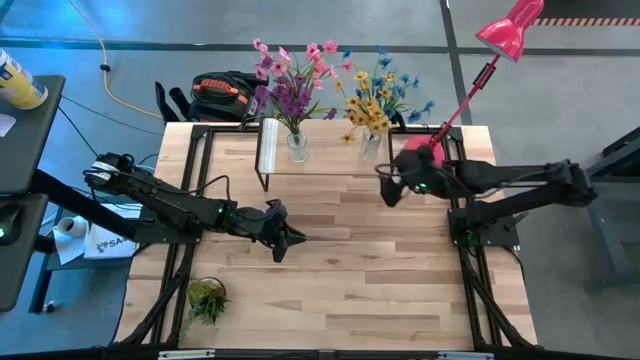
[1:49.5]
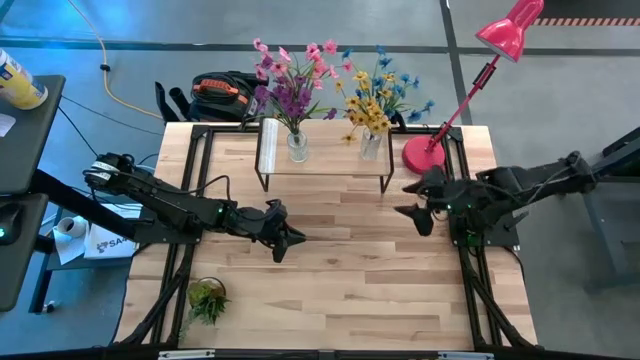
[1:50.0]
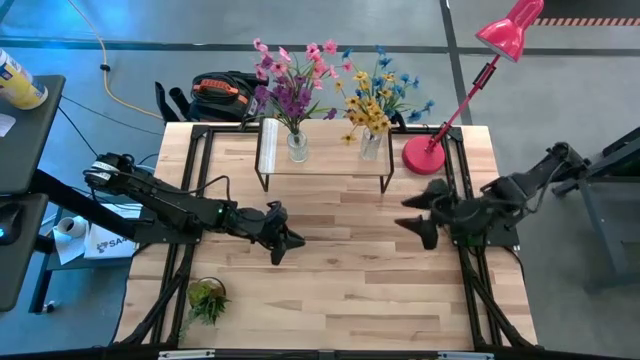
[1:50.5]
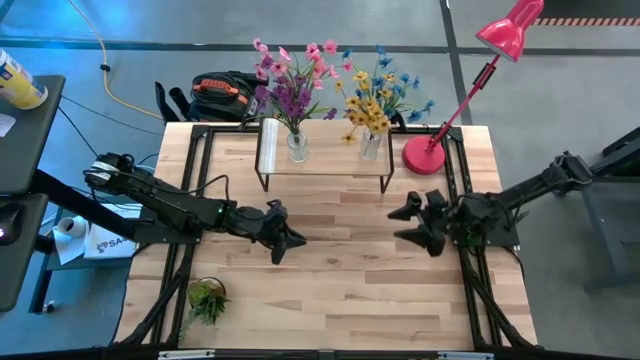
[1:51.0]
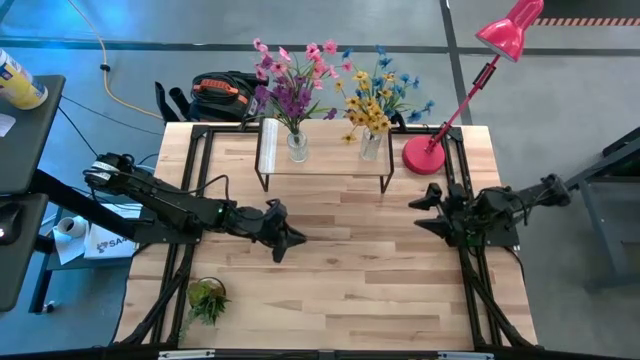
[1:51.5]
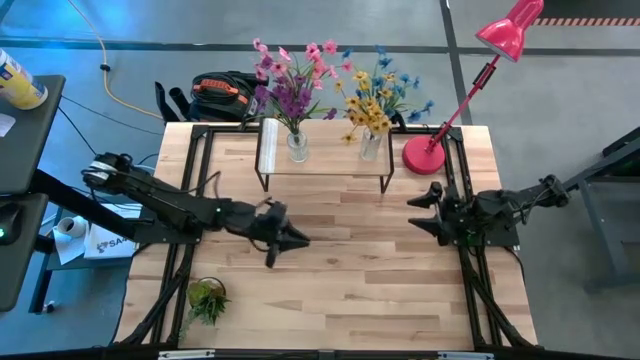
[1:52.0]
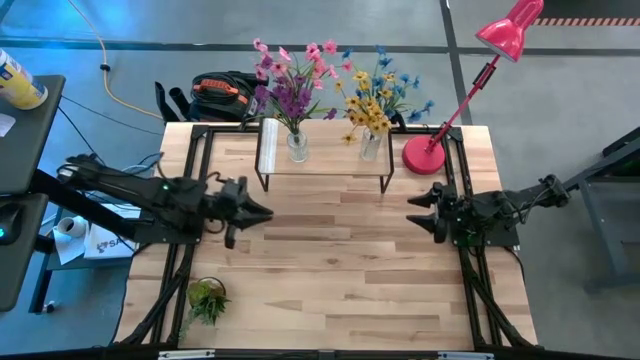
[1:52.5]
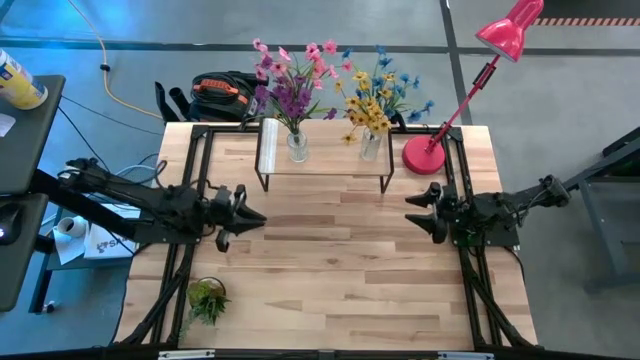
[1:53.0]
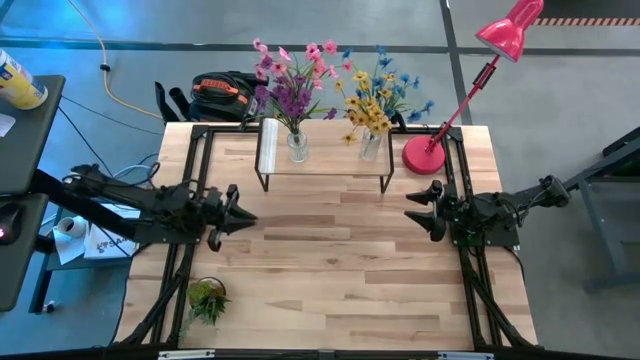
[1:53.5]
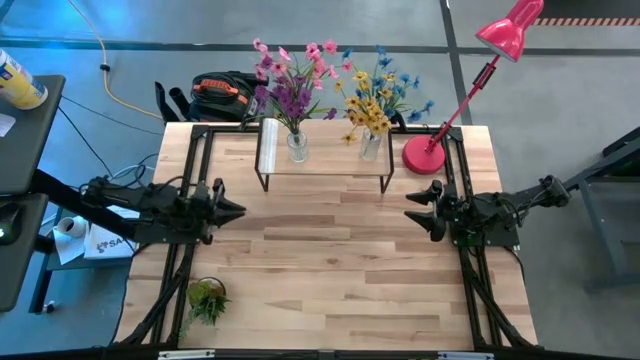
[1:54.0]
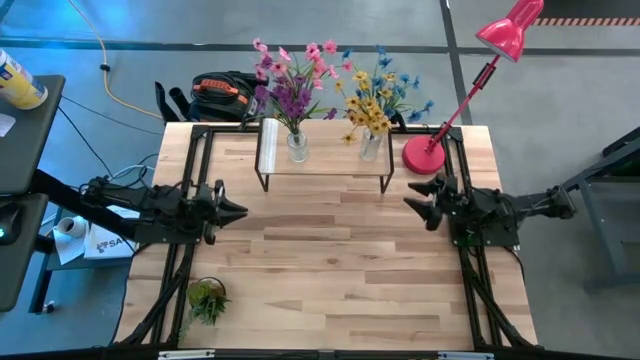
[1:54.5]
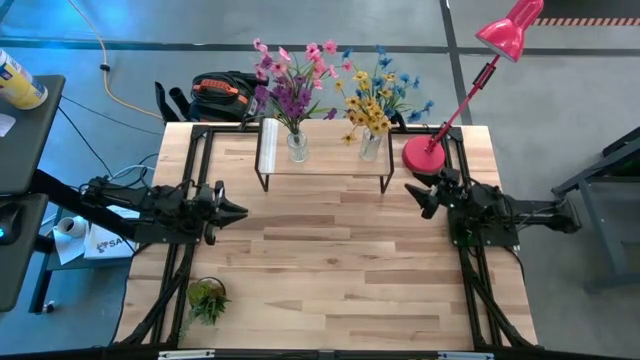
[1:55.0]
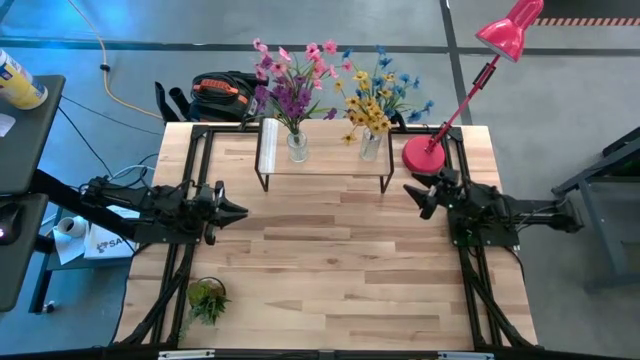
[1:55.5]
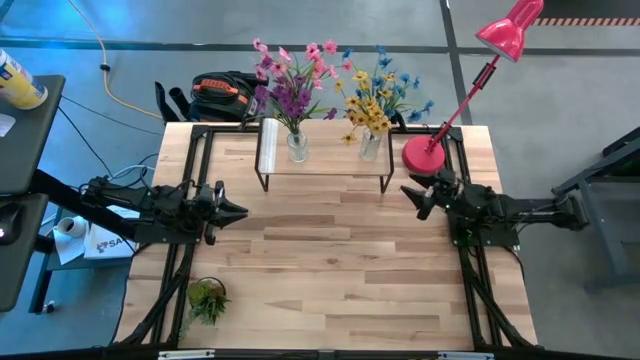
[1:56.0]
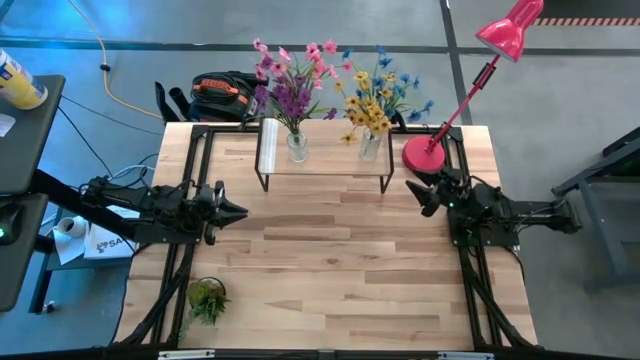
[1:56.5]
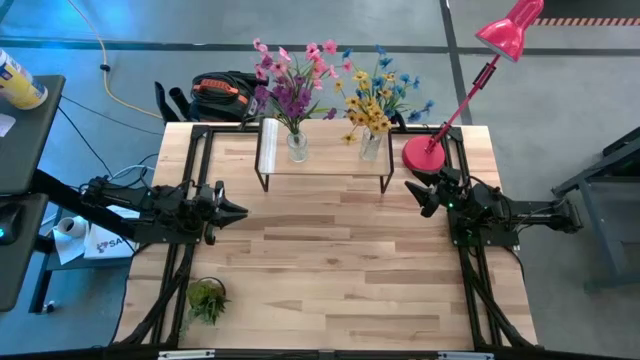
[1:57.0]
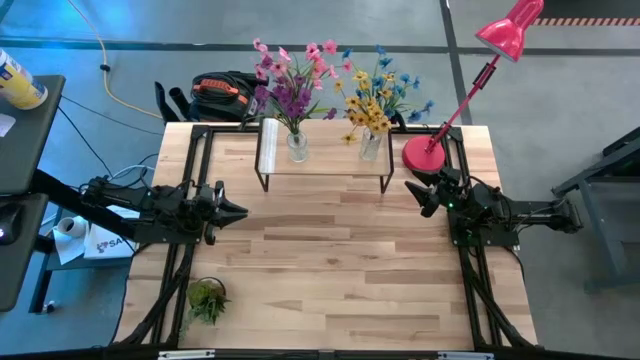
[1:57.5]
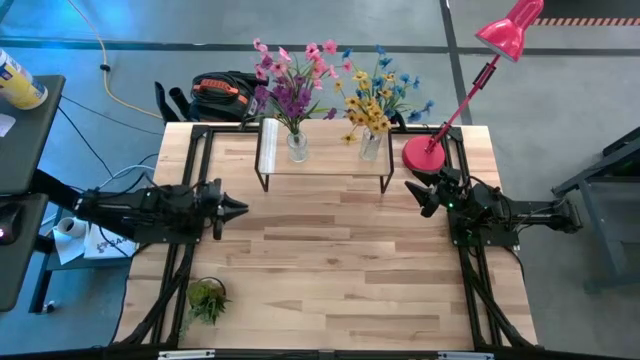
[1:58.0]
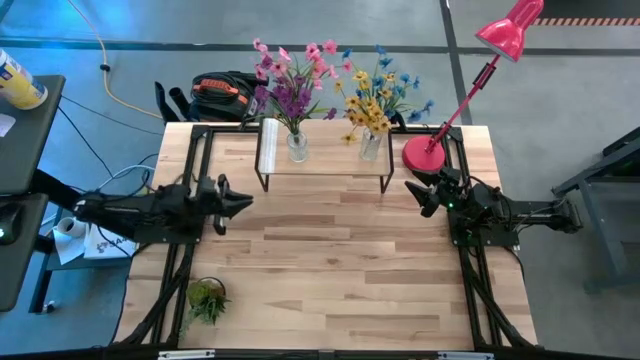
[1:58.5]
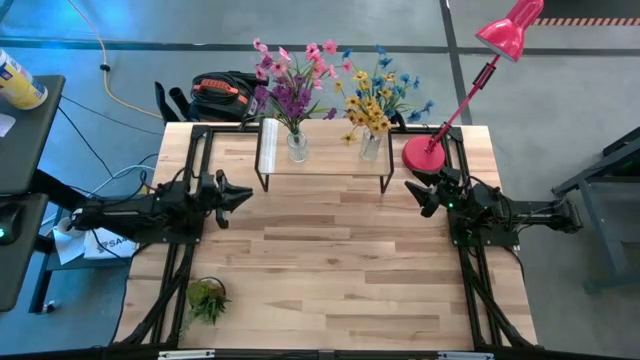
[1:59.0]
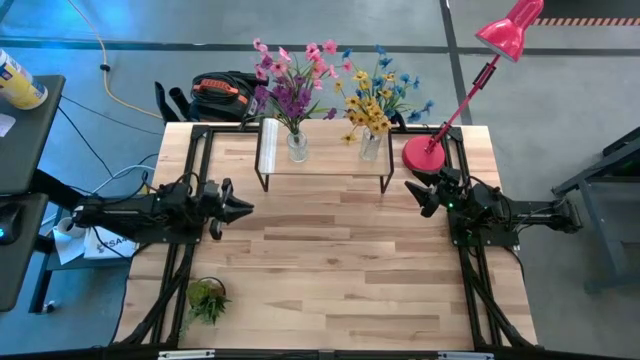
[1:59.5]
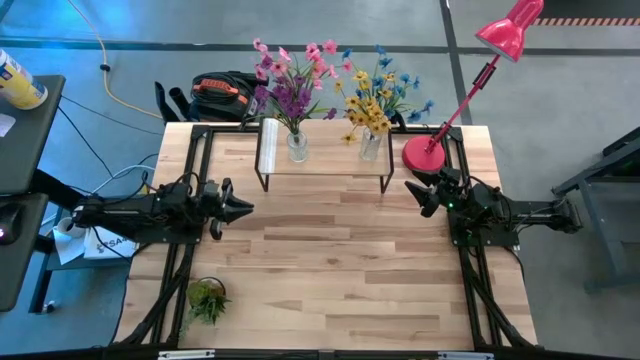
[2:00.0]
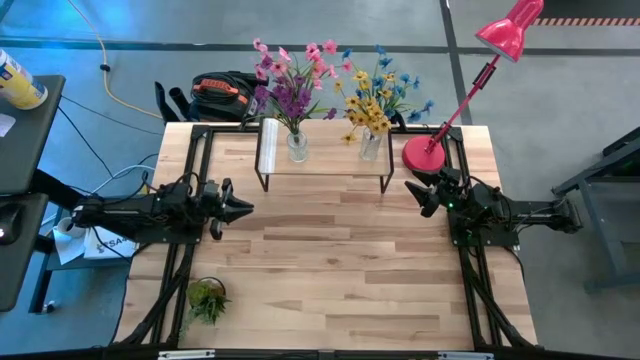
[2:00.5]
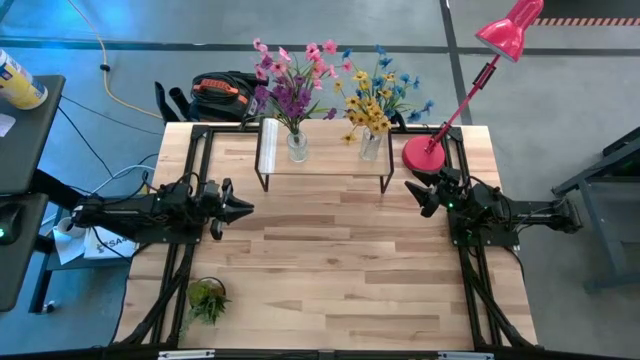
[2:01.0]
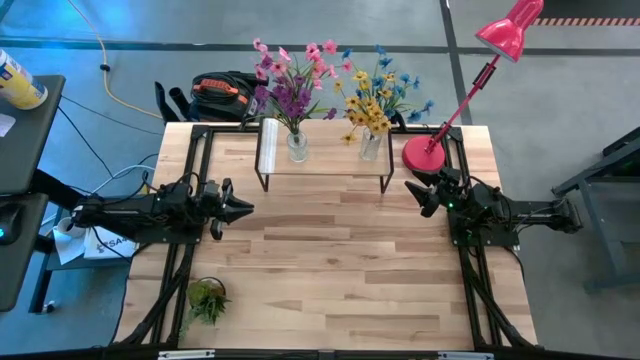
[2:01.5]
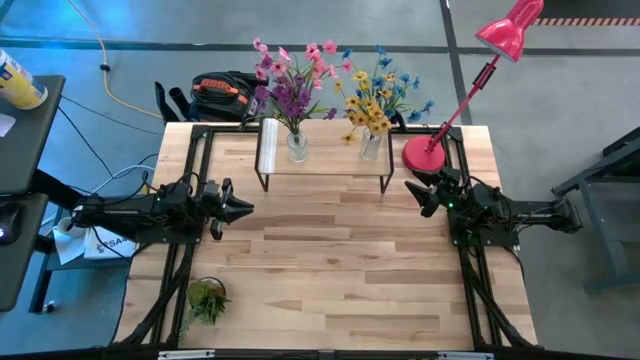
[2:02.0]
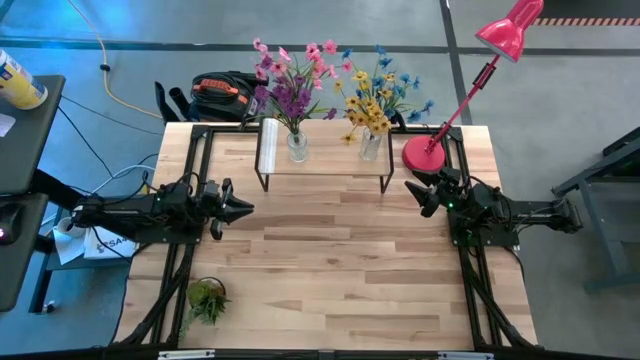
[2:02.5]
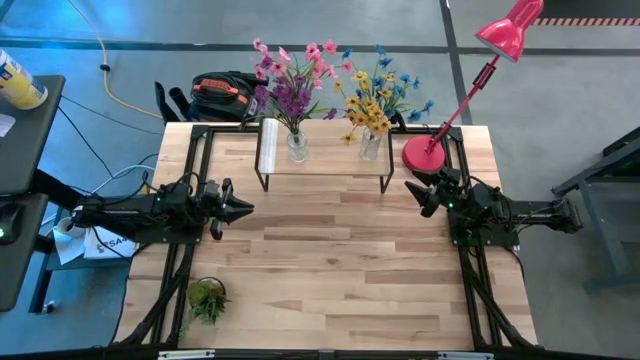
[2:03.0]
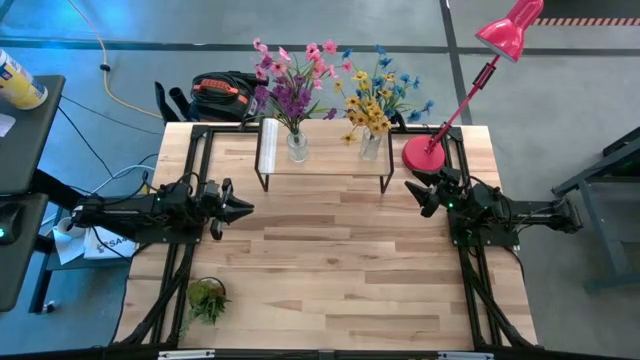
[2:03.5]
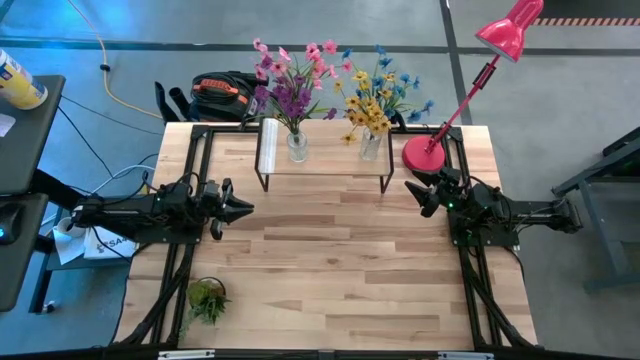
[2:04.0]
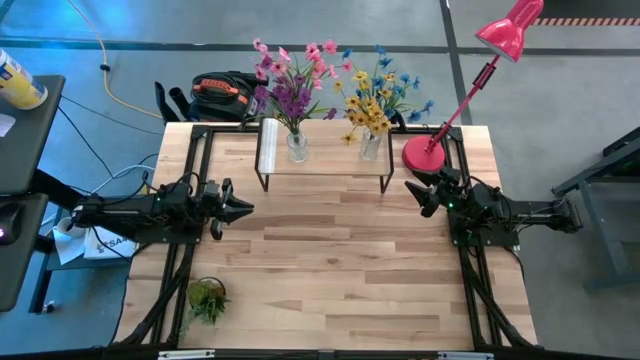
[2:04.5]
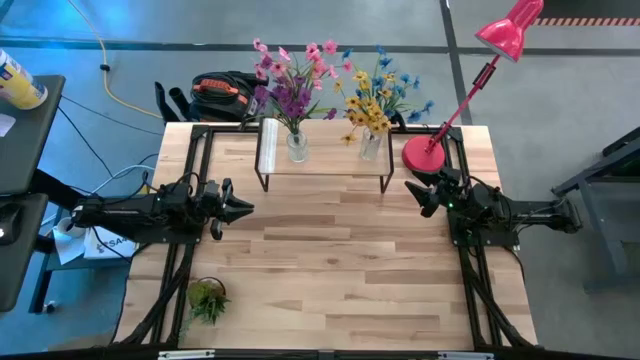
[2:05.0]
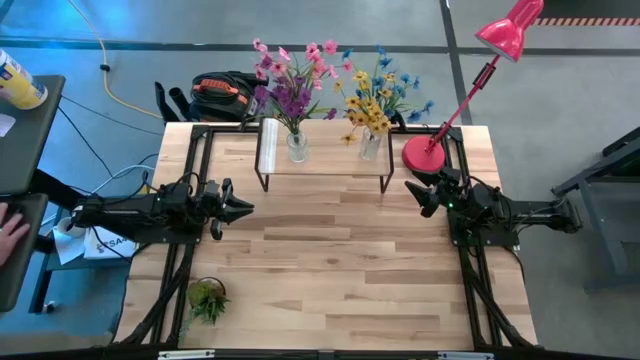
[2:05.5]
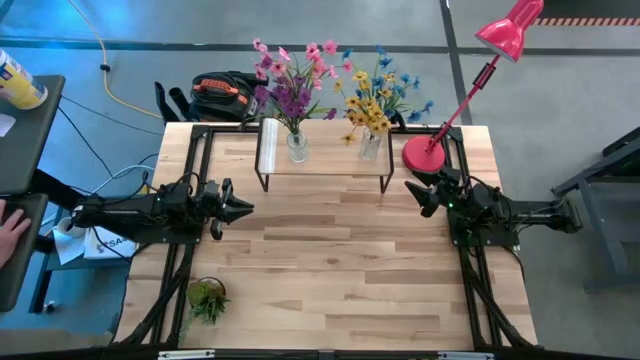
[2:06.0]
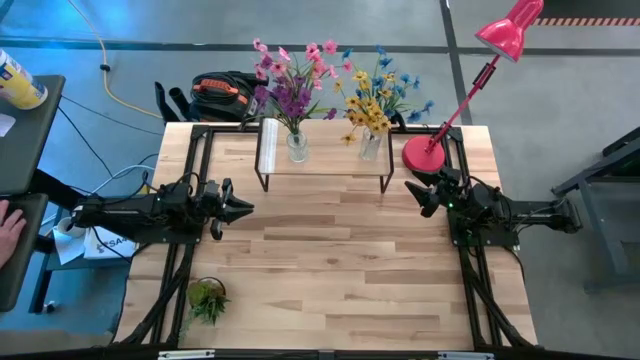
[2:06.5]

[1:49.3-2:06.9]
Task: Pick and place flowers into a vace then onto a shelf
Return to Home Position

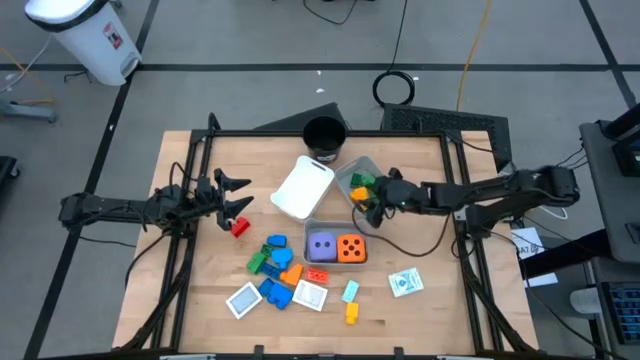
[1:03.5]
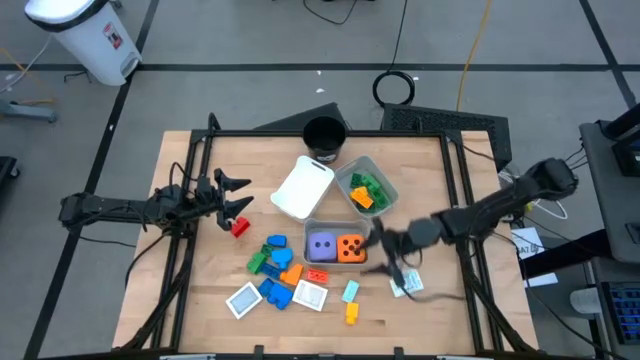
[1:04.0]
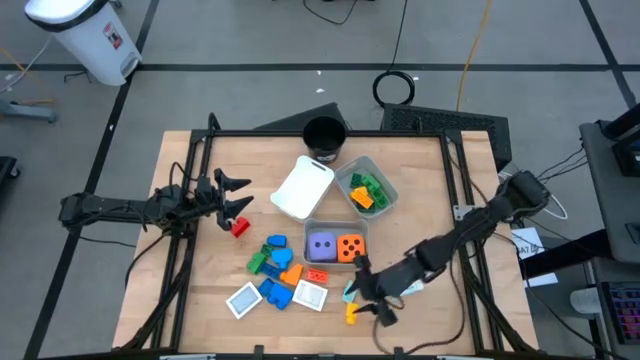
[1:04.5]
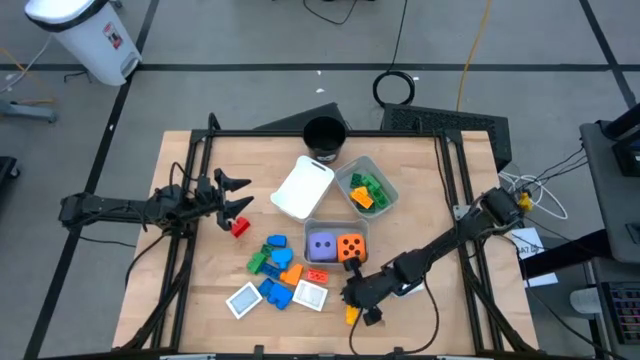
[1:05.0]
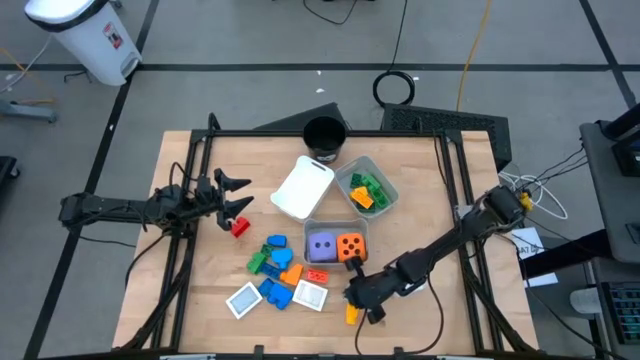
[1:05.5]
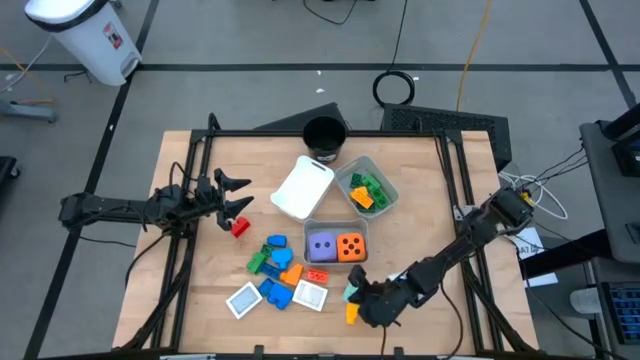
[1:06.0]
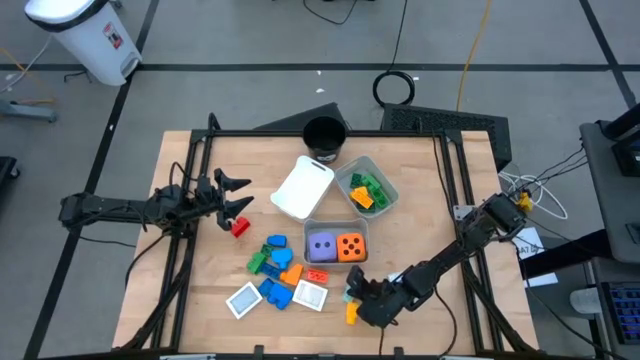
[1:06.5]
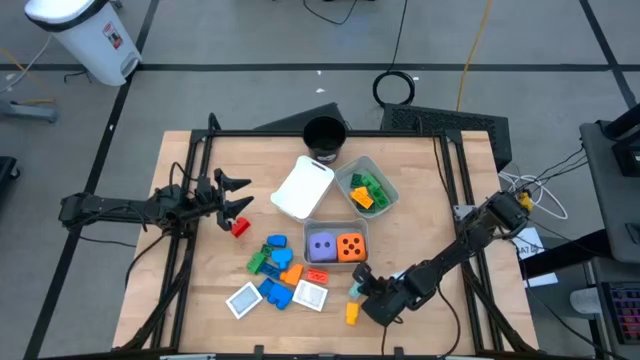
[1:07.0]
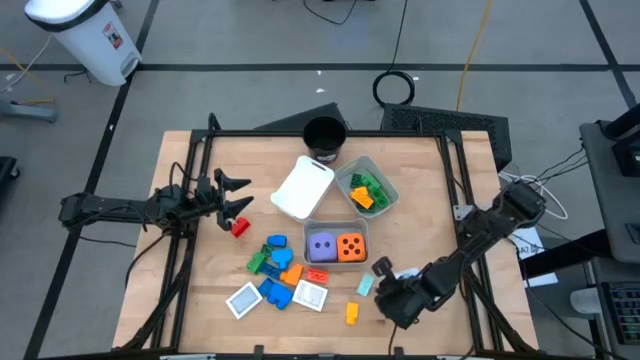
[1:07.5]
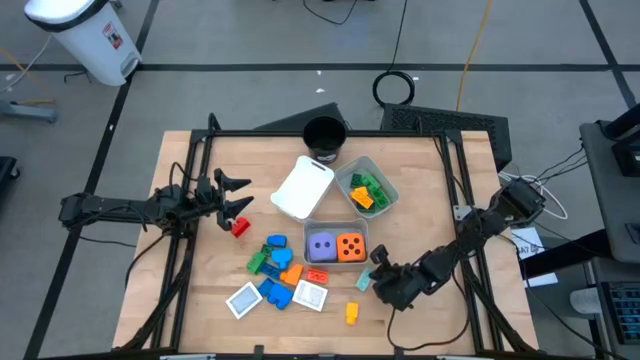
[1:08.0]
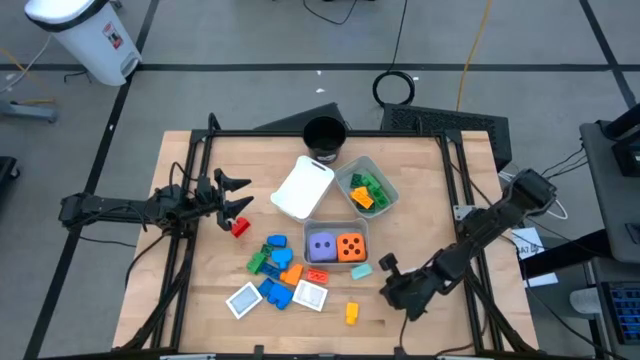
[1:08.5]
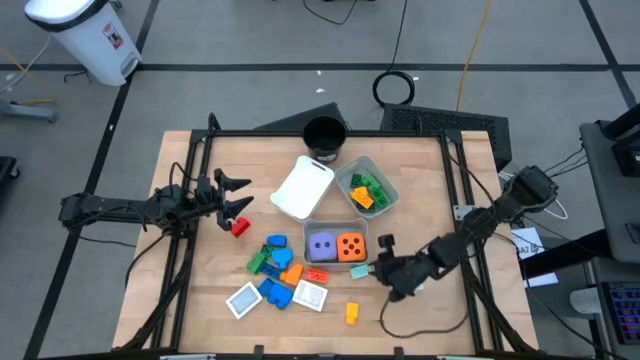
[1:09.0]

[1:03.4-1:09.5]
Task: Pick & Place Toys
Put the light blue game piece into the top gray bin
